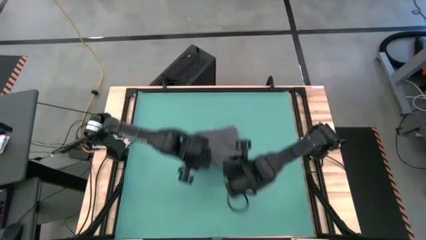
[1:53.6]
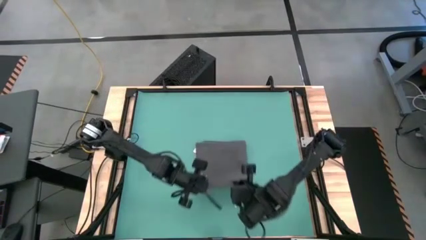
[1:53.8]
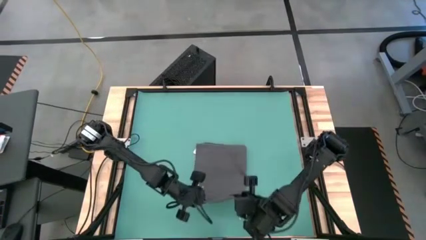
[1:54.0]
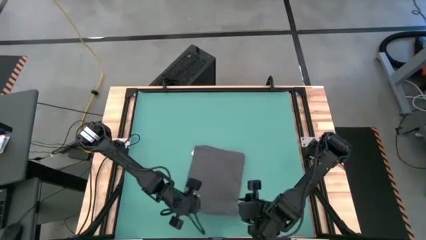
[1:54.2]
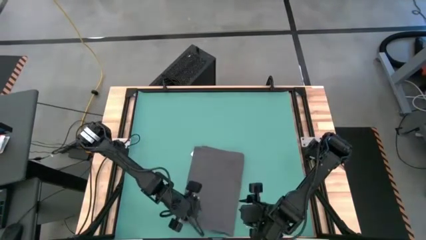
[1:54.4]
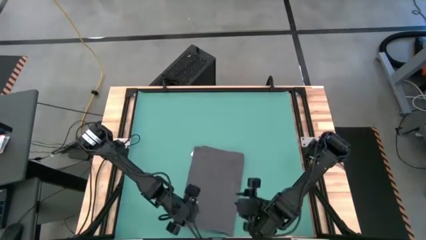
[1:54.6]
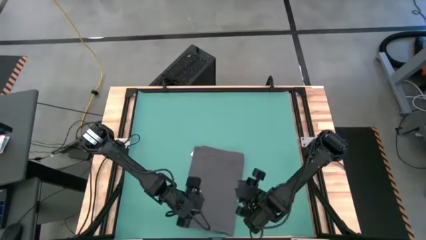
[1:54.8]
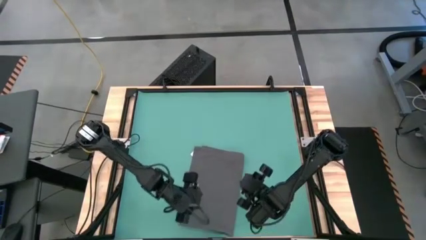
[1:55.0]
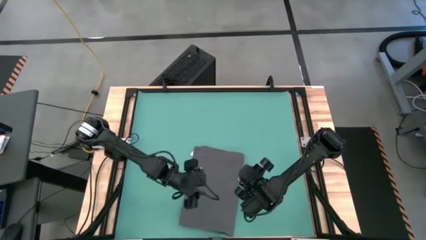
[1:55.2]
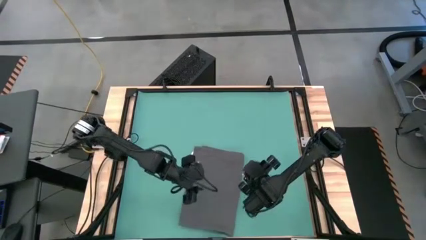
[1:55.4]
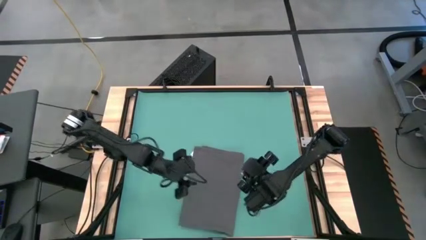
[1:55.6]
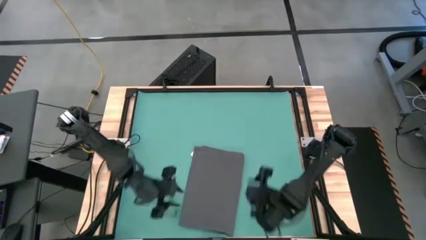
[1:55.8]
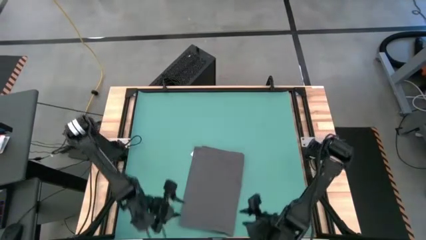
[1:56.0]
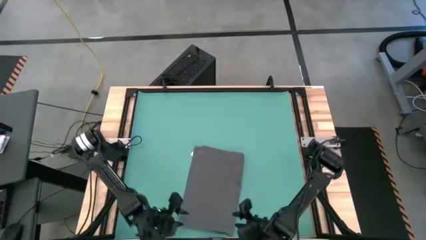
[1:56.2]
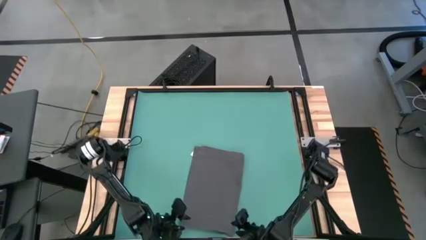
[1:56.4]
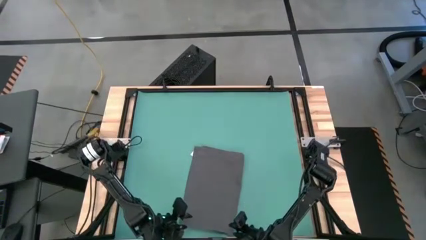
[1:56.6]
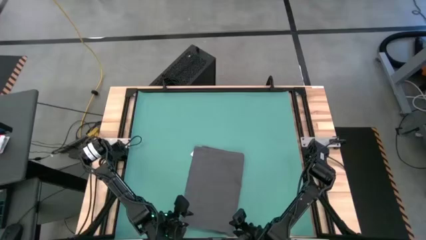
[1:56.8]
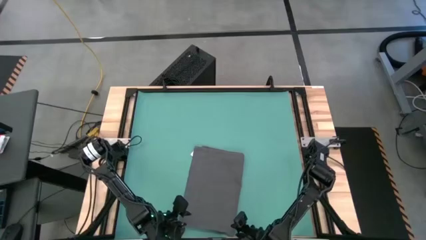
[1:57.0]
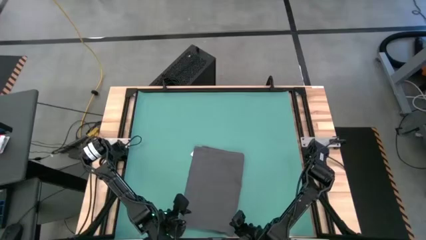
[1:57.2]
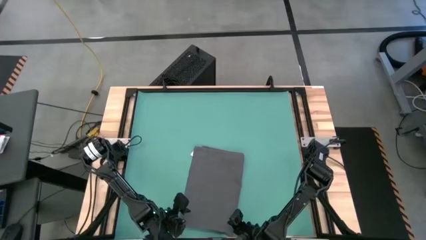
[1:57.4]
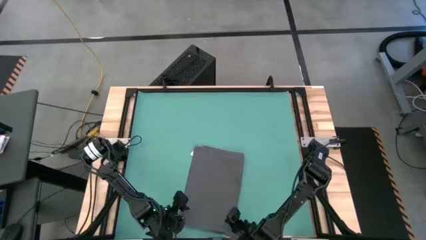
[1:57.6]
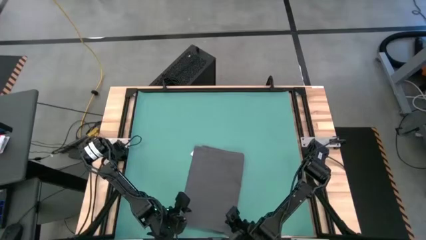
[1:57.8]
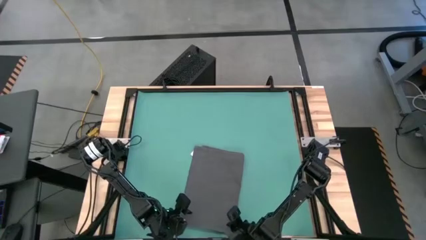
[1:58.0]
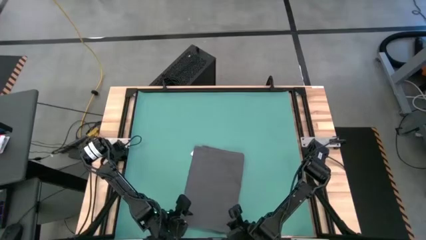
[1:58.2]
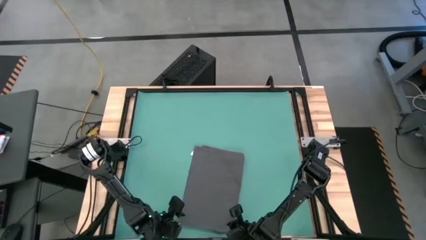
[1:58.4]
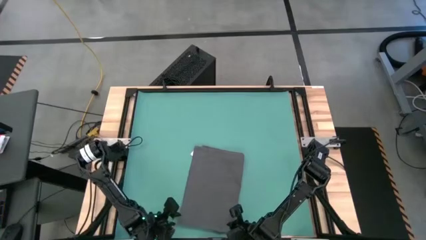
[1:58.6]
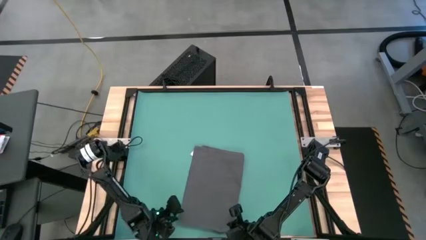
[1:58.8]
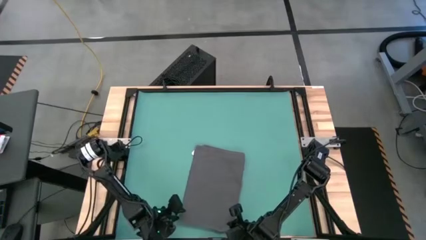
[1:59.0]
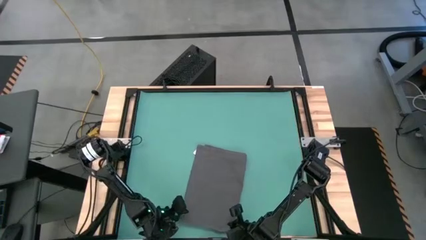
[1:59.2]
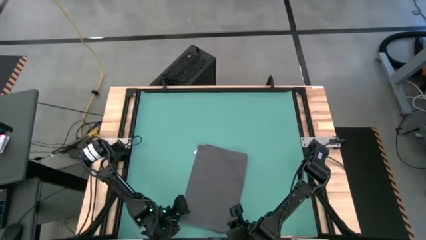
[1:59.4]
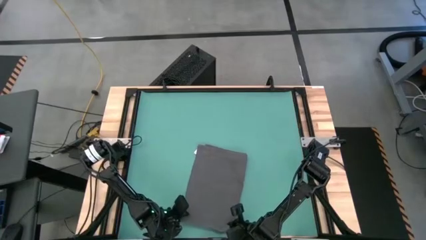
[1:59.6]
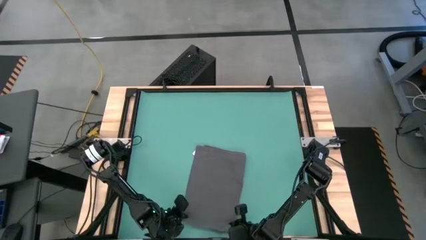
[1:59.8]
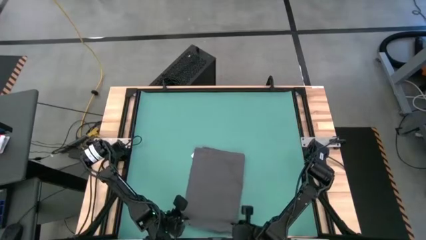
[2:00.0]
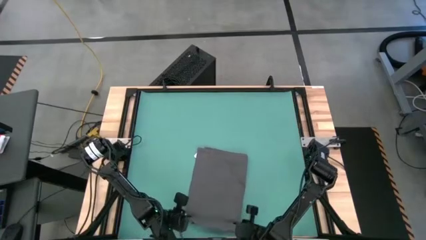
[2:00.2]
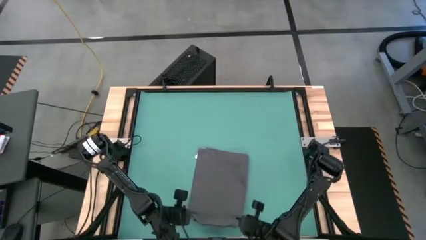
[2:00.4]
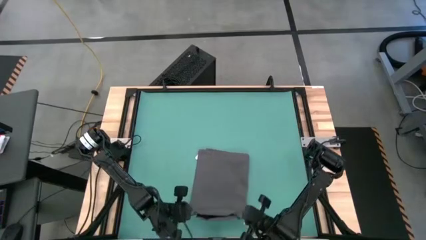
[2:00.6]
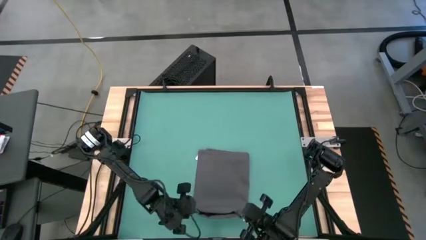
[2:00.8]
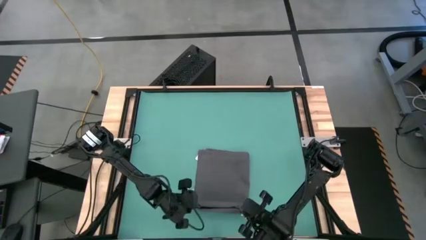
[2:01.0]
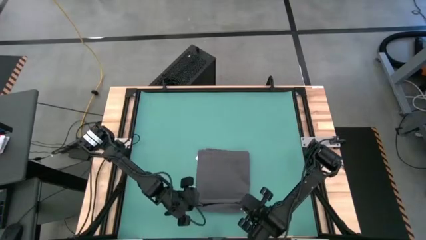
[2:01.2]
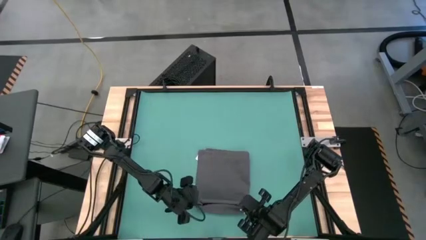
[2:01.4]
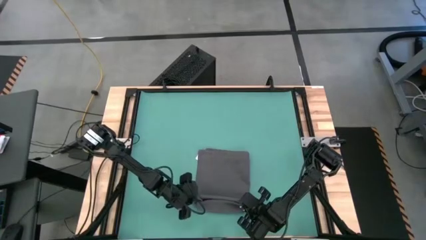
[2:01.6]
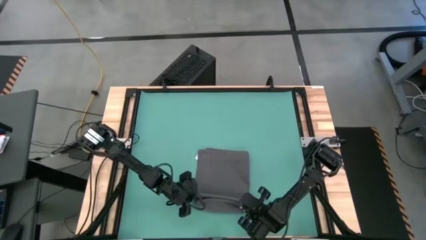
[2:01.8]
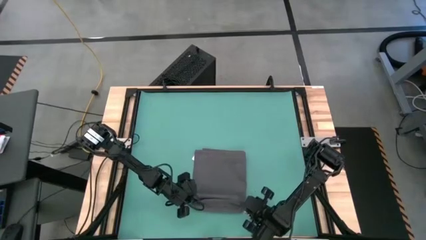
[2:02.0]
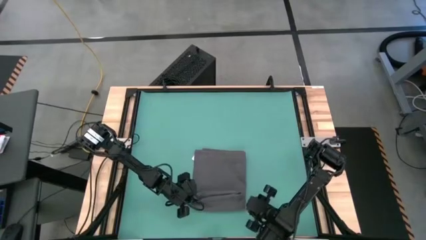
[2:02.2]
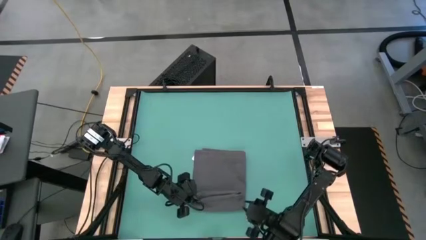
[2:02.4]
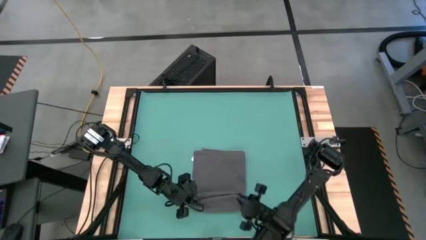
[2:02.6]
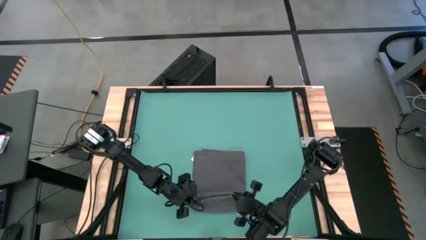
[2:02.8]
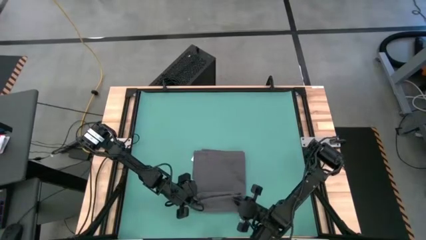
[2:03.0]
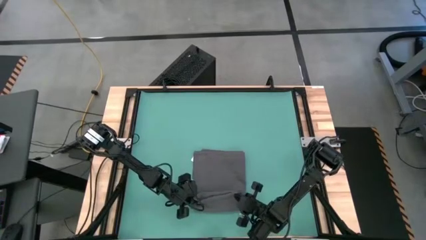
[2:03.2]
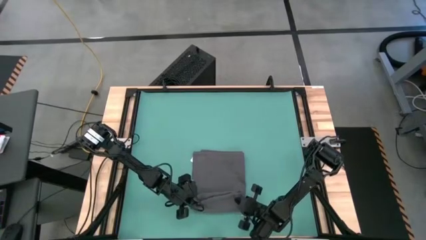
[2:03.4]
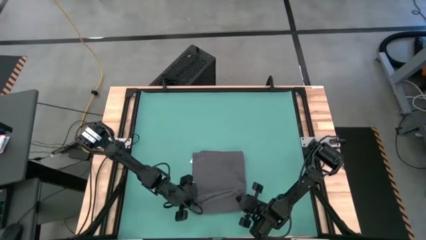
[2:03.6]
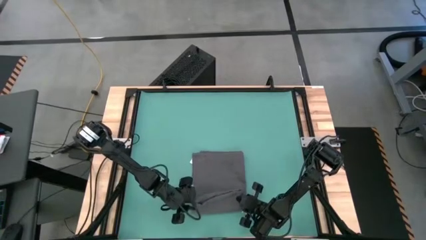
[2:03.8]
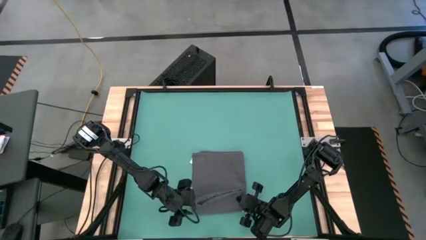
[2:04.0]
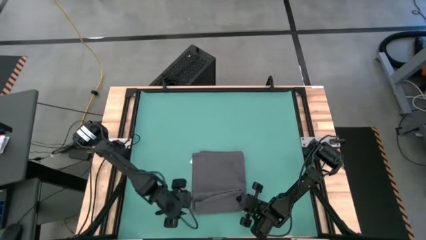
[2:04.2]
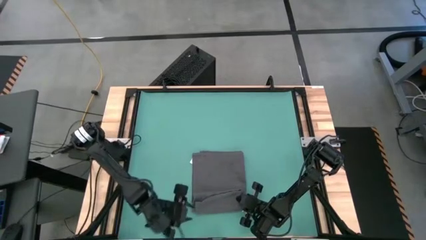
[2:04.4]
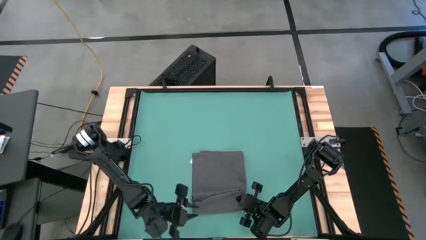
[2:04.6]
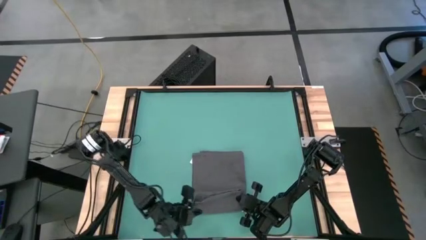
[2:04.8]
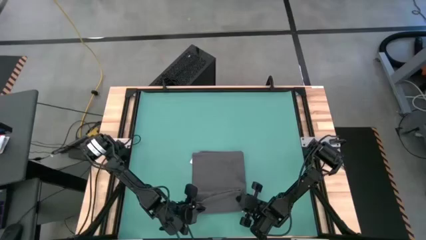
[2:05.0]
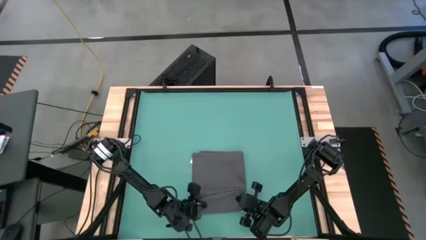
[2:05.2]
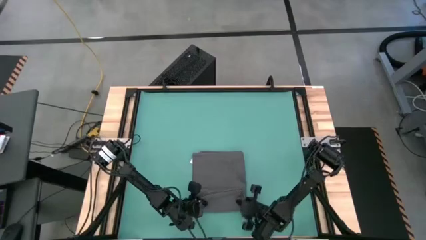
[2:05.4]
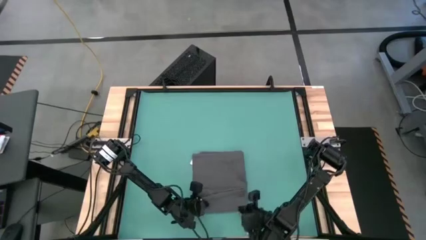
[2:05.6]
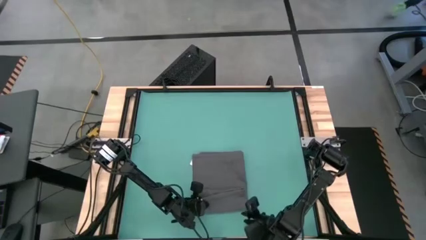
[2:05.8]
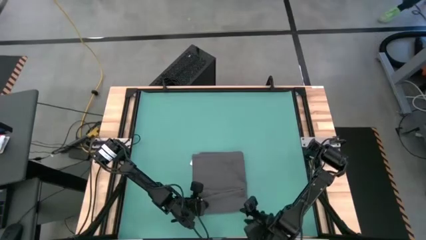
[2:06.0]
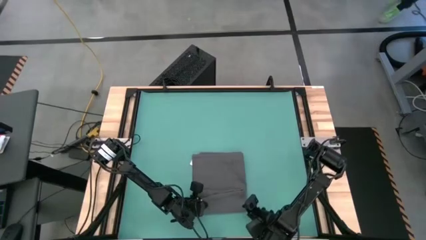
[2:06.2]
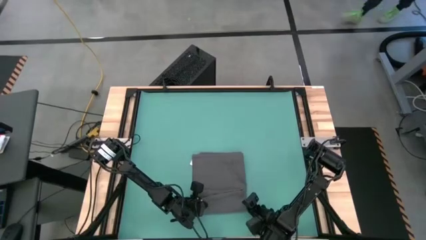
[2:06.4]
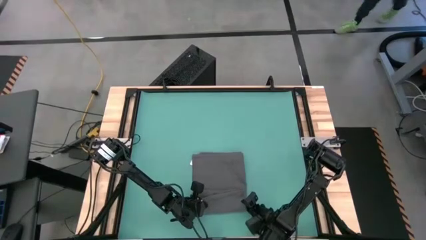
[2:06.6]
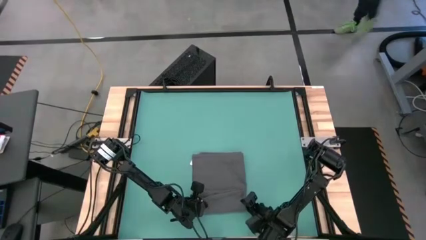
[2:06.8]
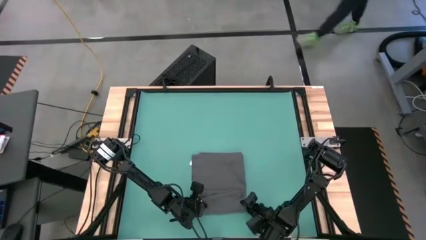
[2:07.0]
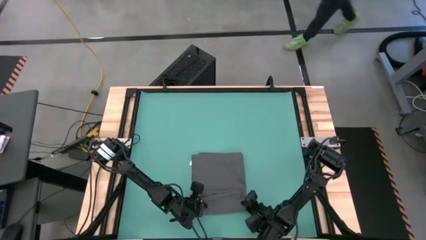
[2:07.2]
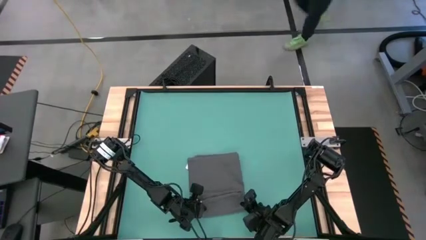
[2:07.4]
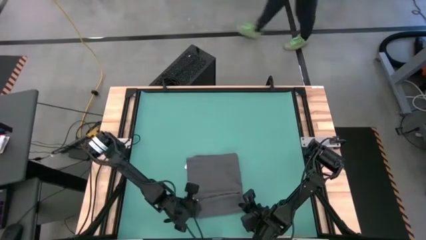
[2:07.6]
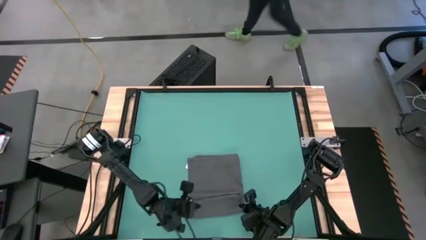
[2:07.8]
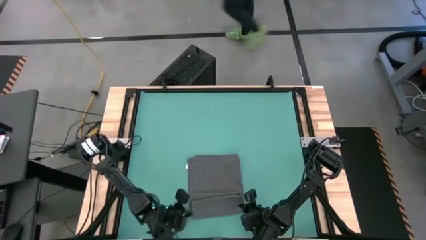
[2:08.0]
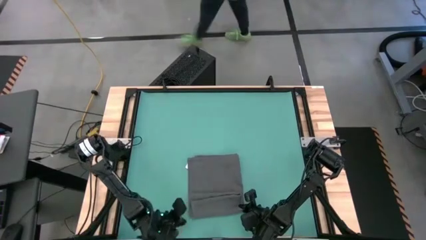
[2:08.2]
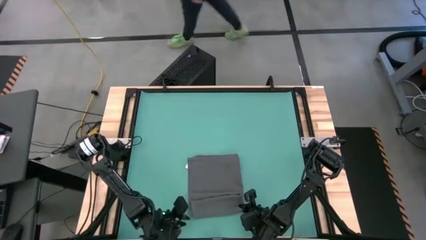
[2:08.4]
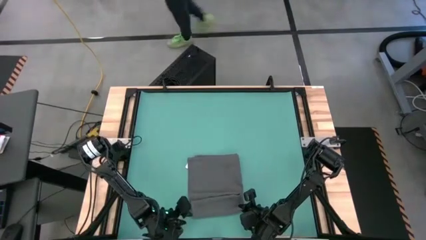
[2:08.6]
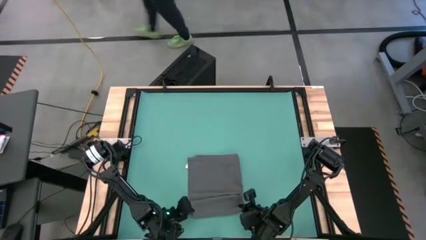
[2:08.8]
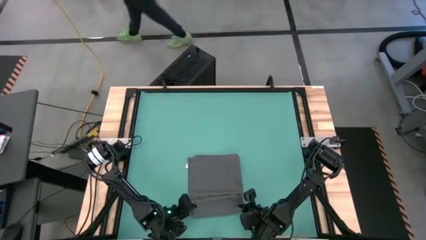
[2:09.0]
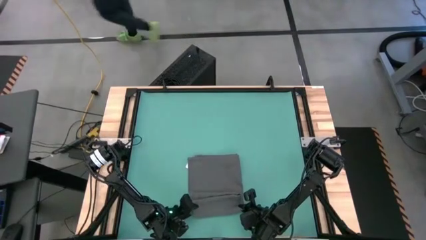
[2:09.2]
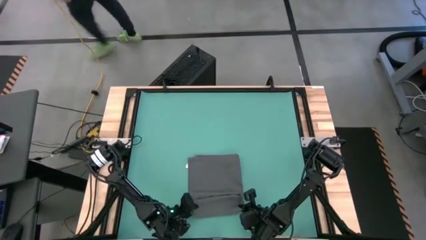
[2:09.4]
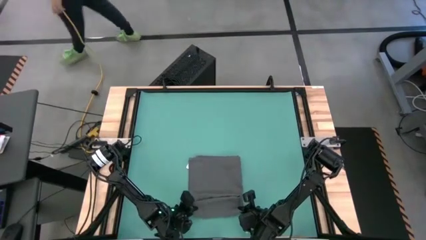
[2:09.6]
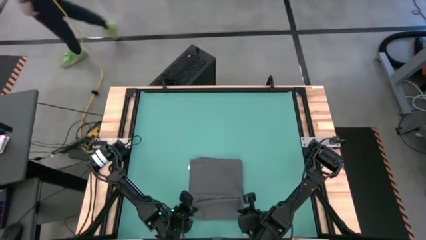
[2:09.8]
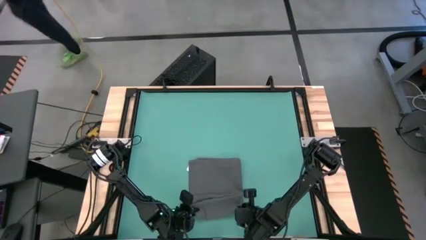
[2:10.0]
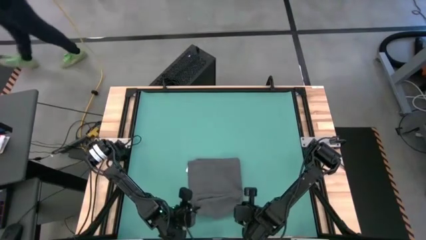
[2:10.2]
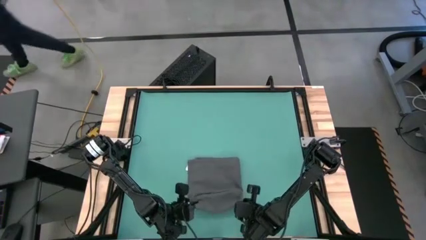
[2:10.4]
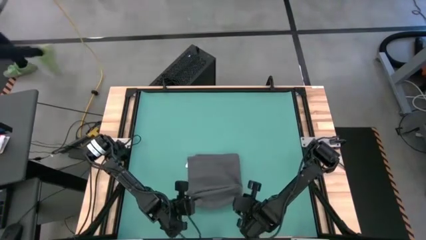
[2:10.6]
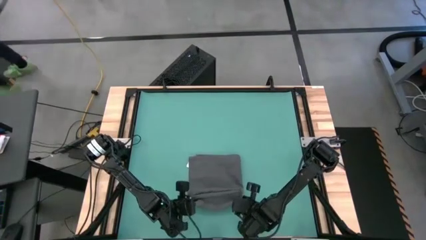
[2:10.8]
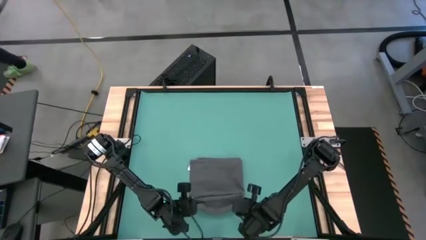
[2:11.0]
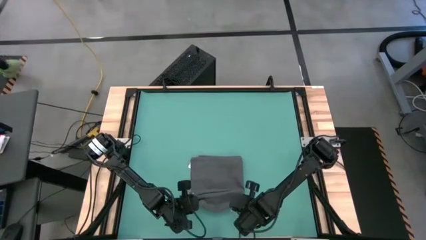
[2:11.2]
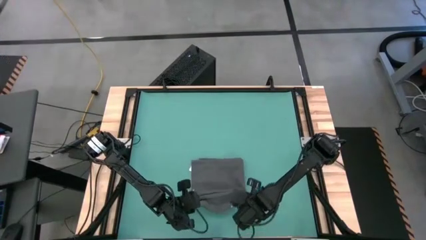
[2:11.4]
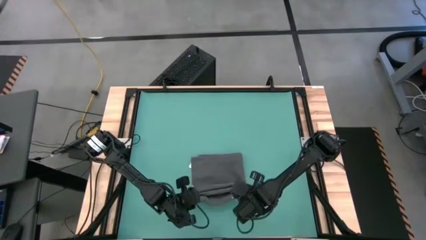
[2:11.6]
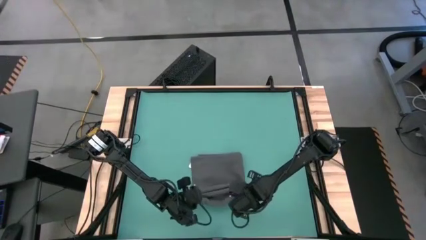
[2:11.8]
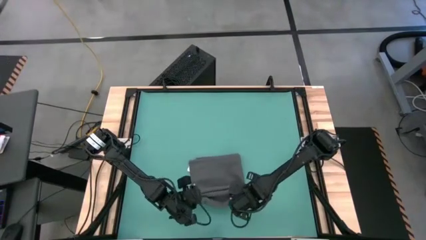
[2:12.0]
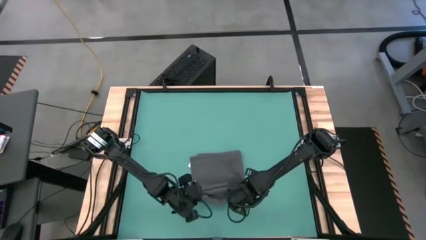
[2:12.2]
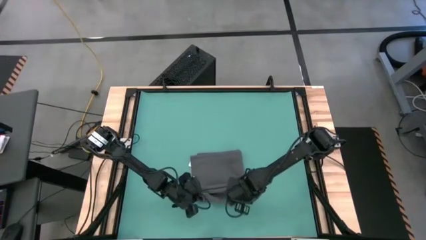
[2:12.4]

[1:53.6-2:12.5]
Task: Roll towel
Roll the gray towel
